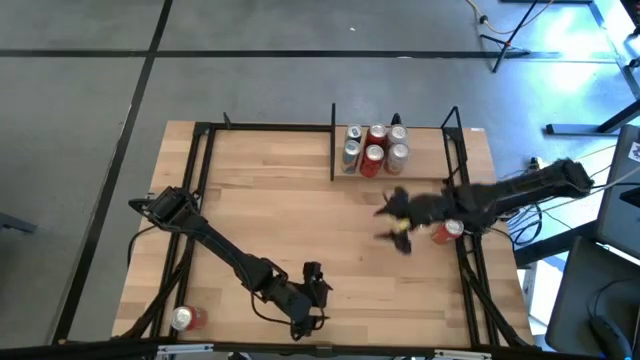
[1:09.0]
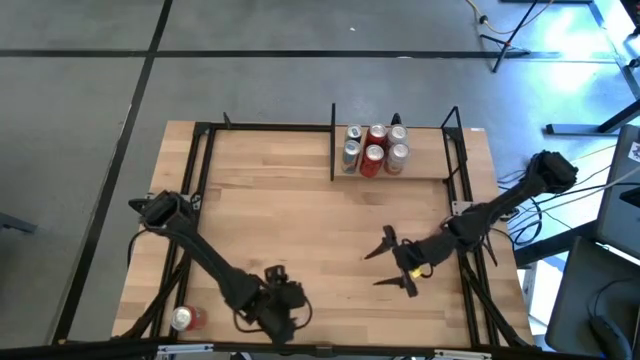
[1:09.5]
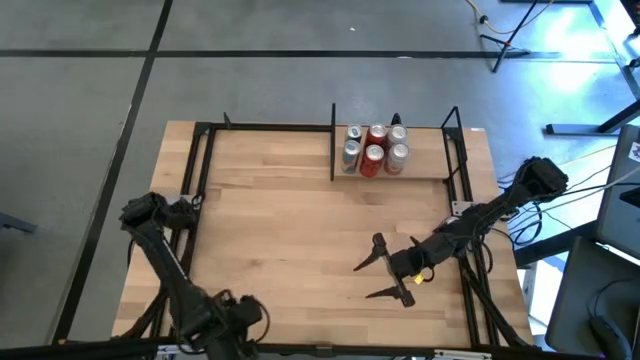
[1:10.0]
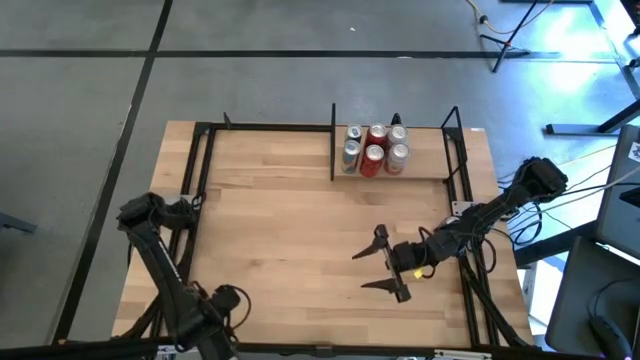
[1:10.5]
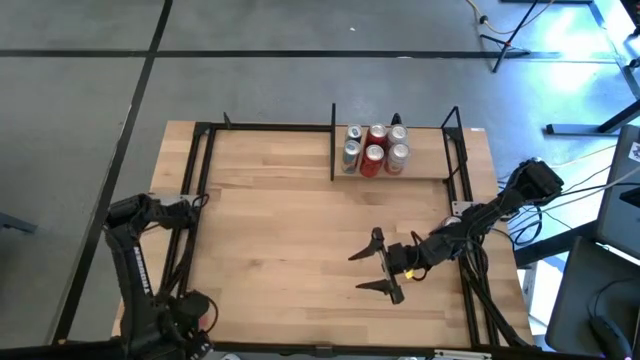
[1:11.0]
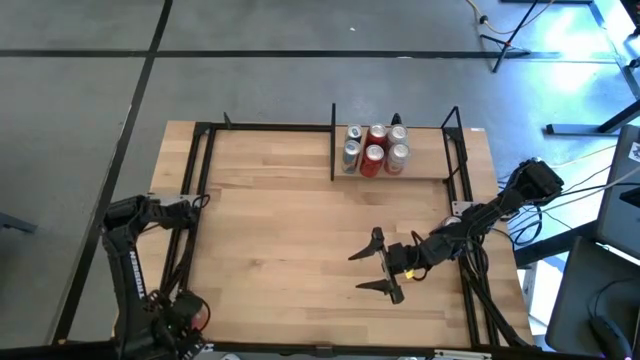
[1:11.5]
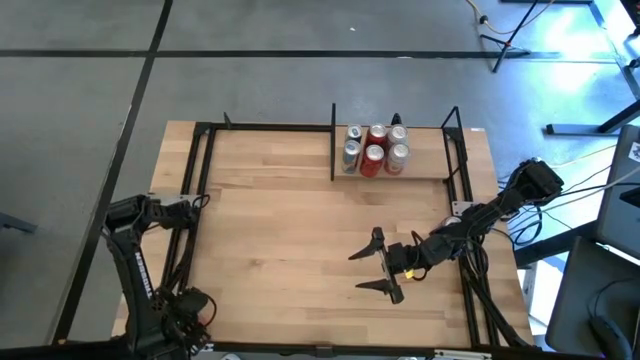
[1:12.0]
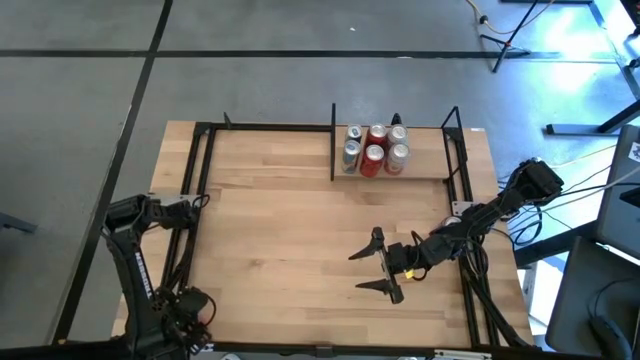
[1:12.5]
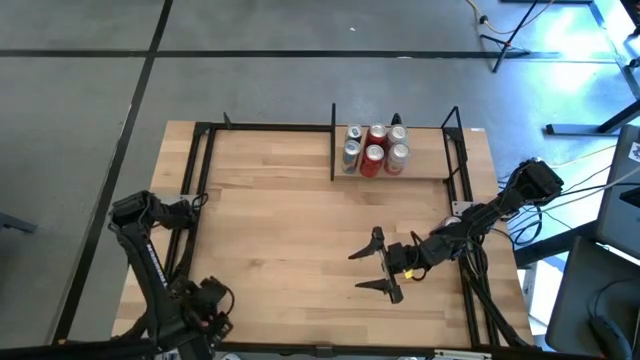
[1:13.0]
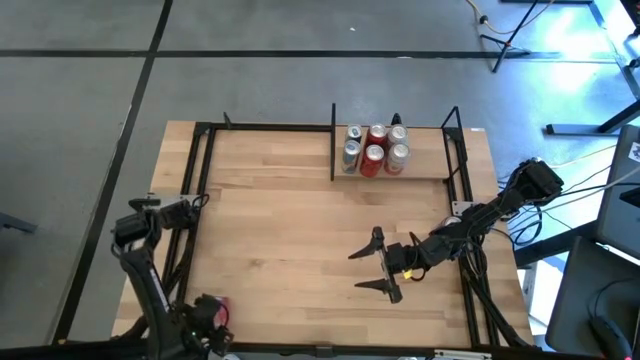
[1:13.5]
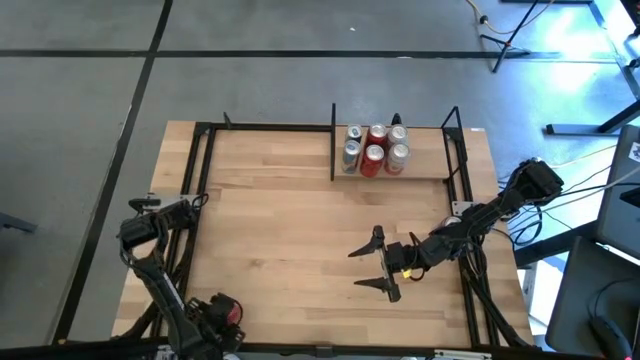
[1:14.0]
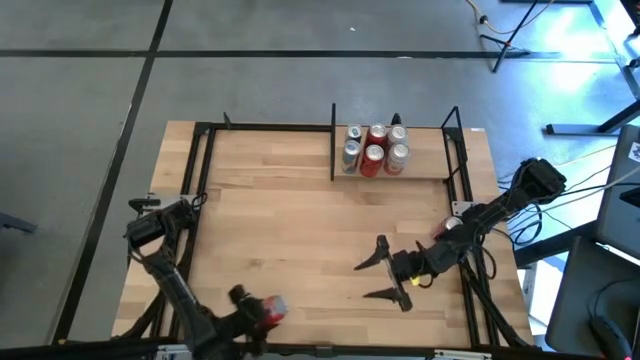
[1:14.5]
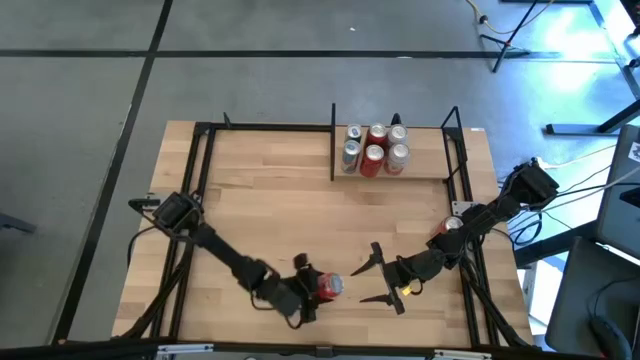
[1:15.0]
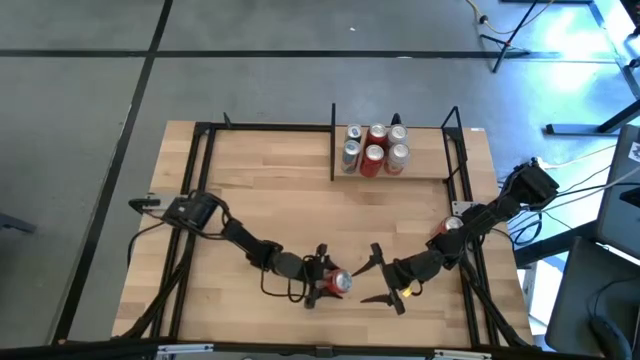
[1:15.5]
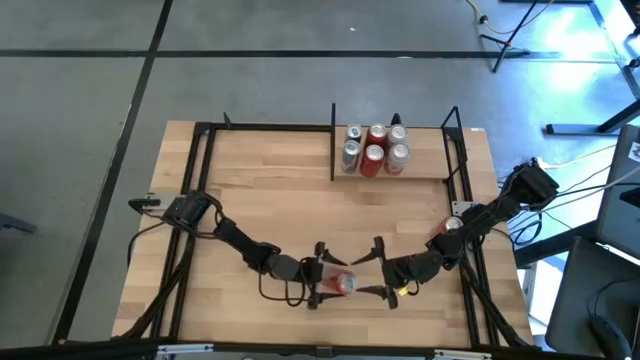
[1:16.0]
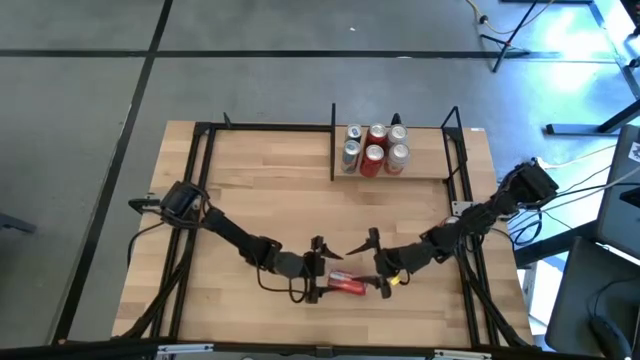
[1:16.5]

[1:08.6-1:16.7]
Task: Place canned beverage on shelf
Put the bottom red soda can on the shelf

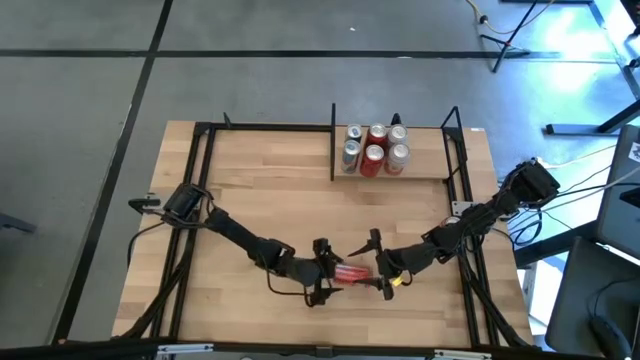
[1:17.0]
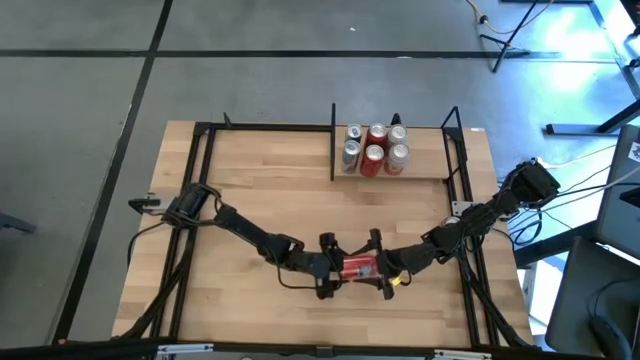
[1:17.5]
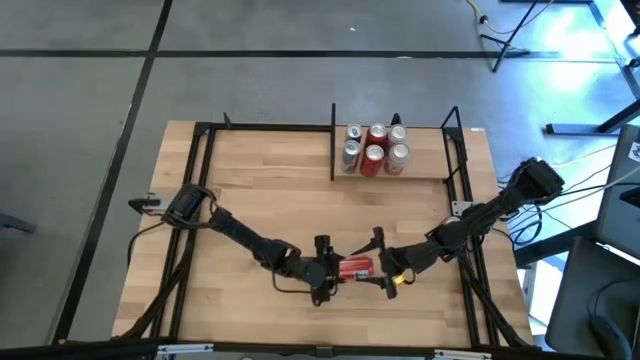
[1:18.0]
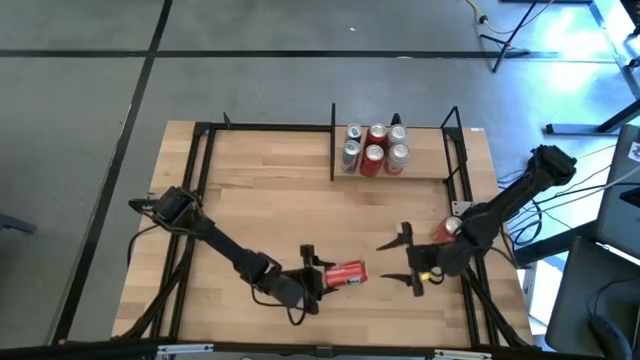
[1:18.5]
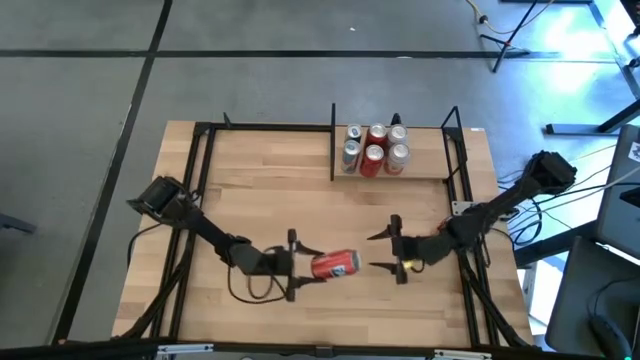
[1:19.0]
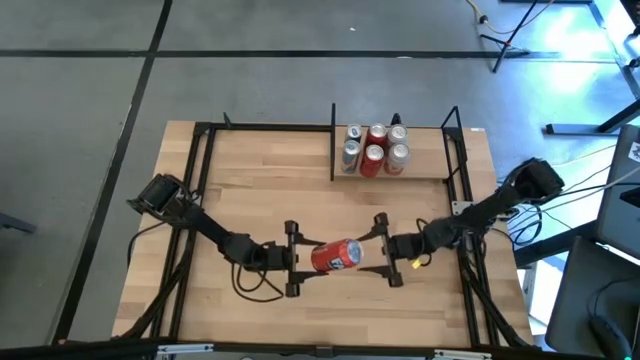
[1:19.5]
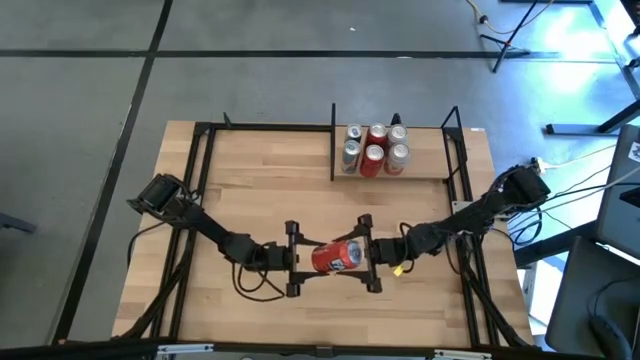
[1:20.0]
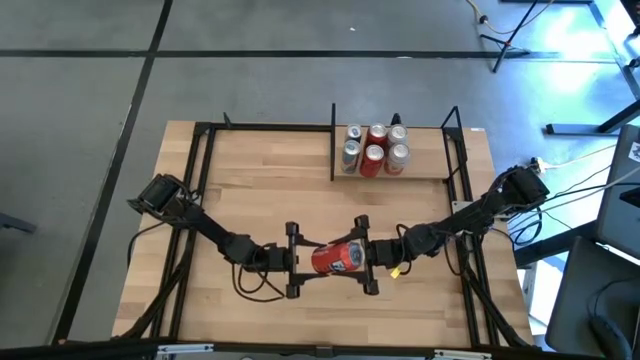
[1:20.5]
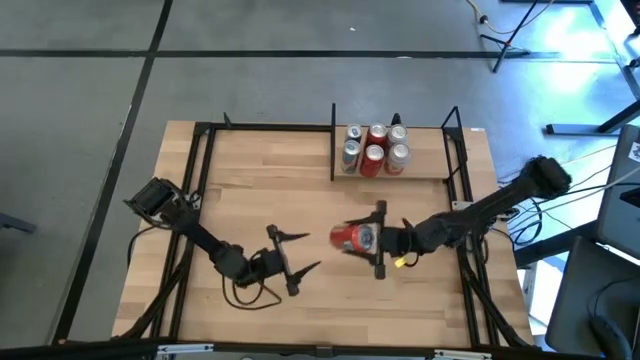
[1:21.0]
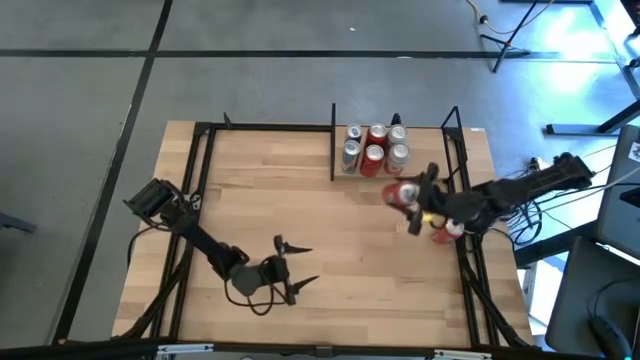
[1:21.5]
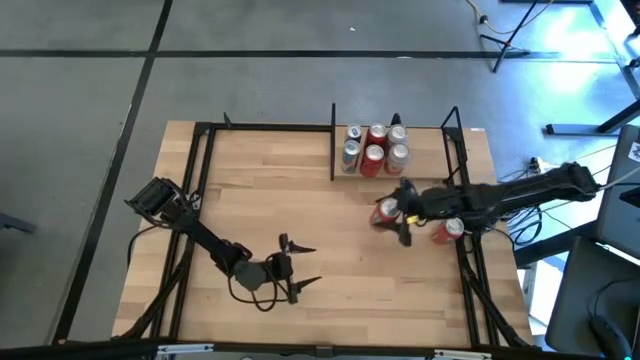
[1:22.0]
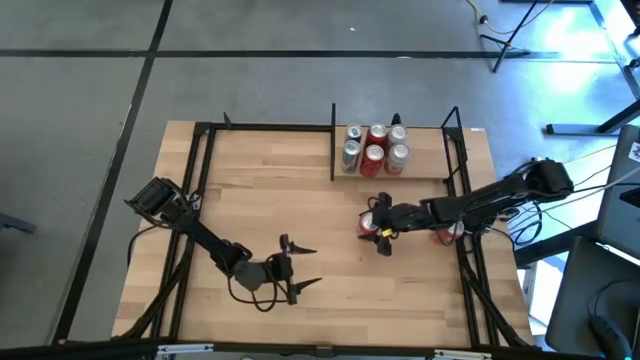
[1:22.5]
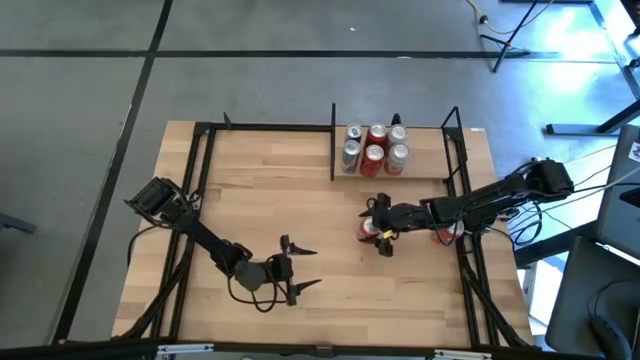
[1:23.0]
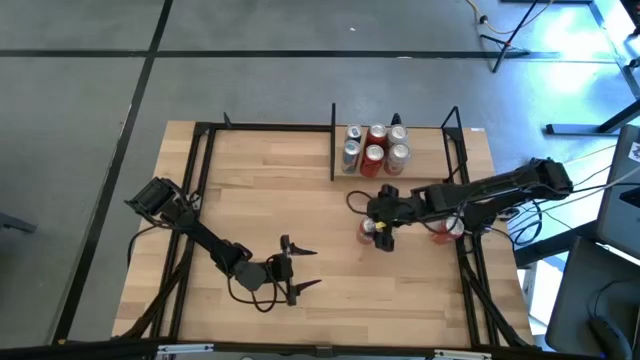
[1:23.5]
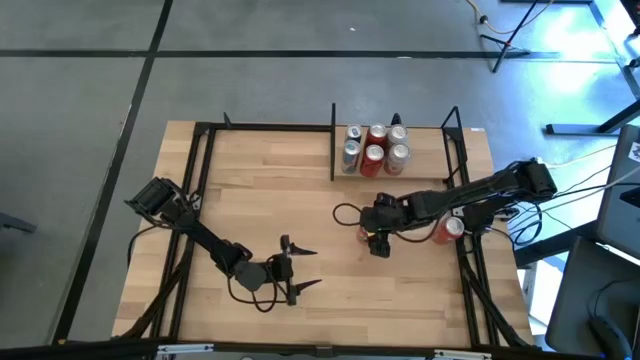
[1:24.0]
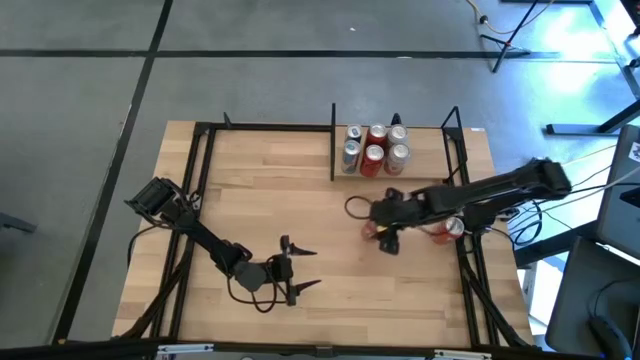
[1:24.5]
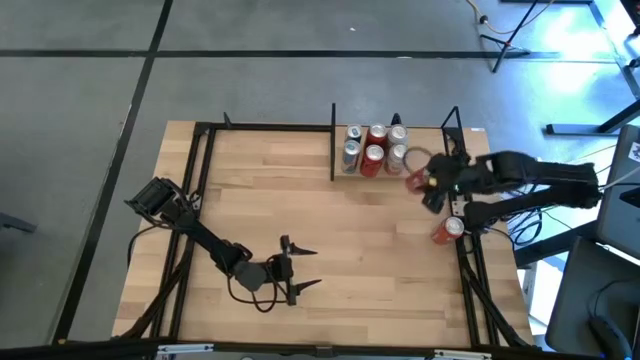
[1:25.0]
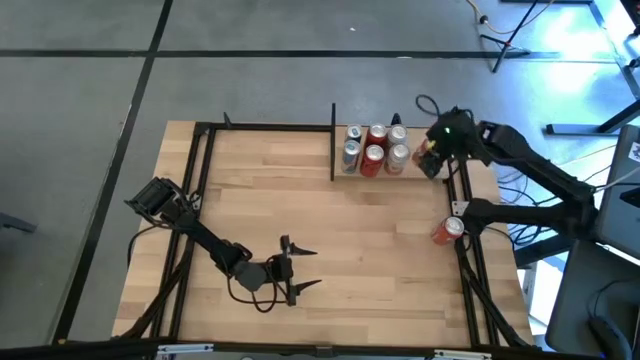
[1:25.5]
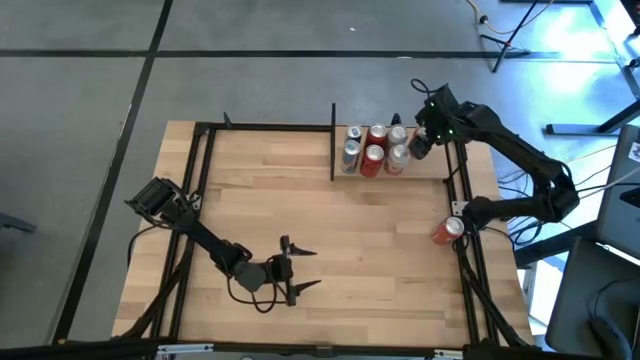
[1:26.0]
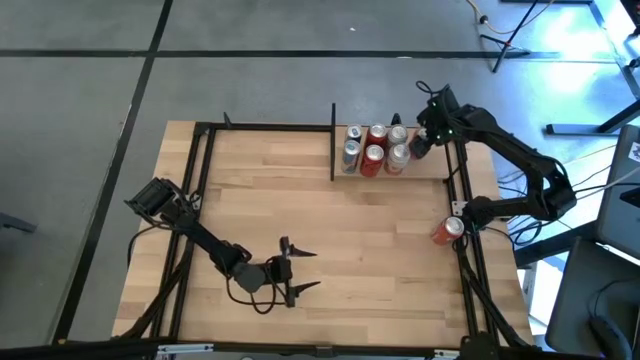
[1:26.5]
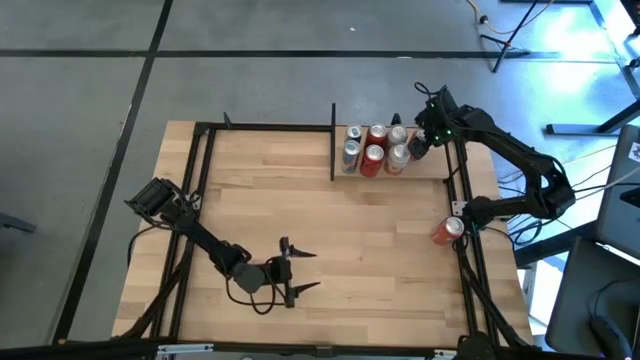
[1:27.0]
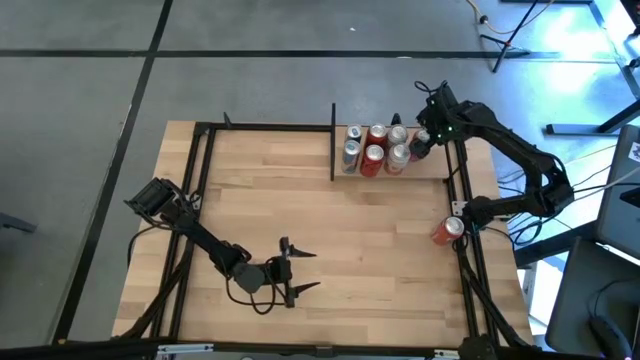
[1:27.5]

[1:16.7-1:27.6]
Put the bottom red soda can on the shelf

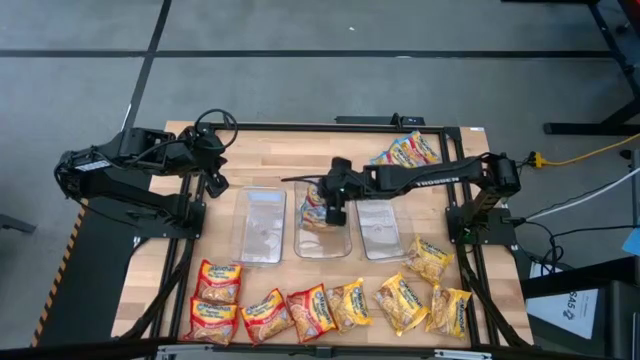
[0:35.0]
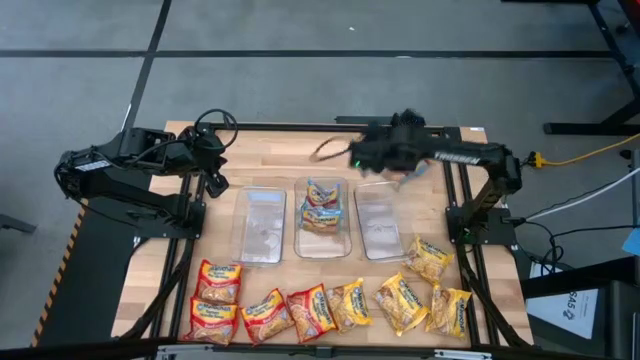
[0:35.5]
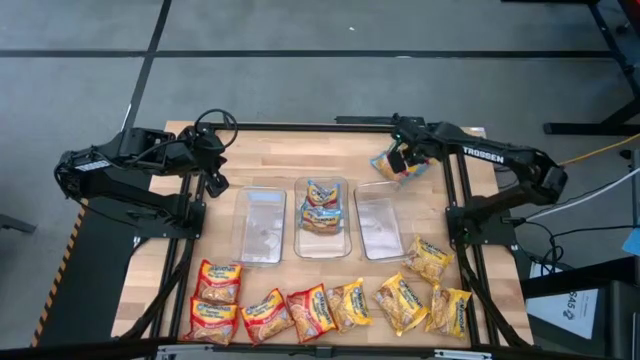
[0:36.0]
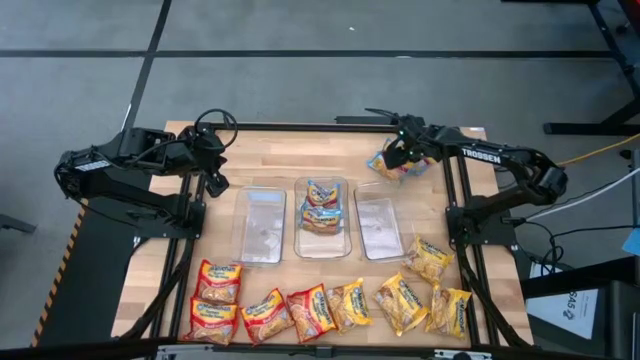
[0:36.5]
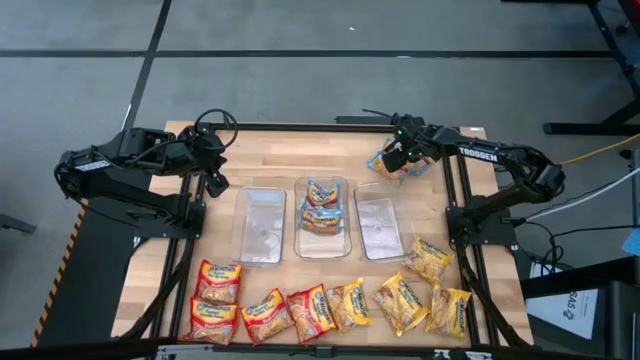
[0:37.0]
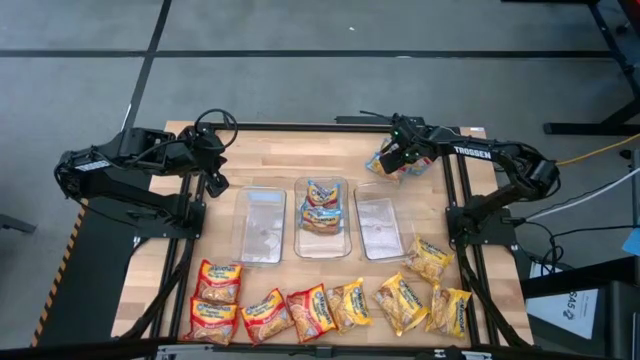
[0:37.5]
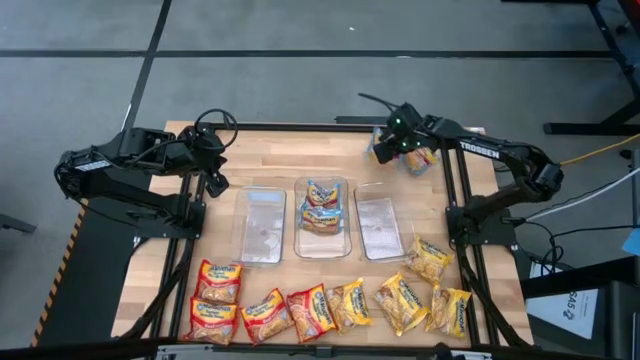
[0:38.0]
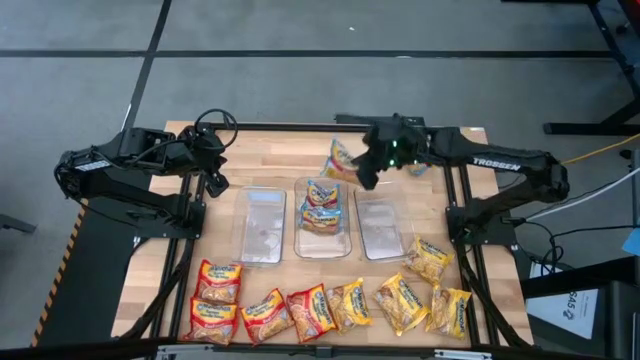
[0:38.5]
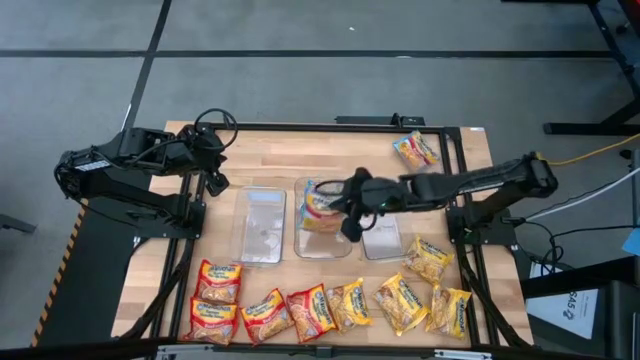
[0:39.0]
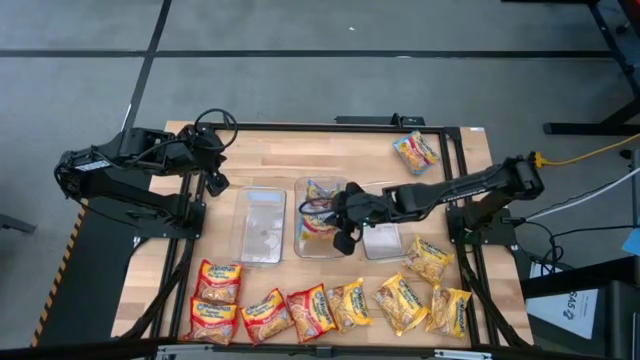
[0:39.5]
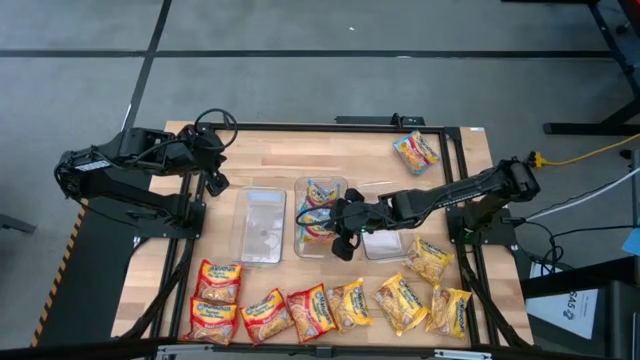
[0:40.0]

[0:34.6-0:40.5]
Task: Sort Maruchan noodles
Put the blue noodle pack into the middle transparent bin
